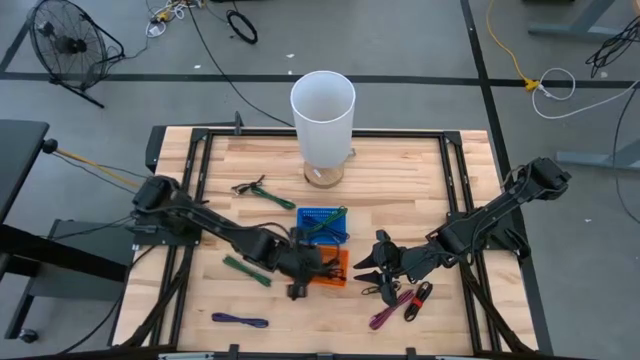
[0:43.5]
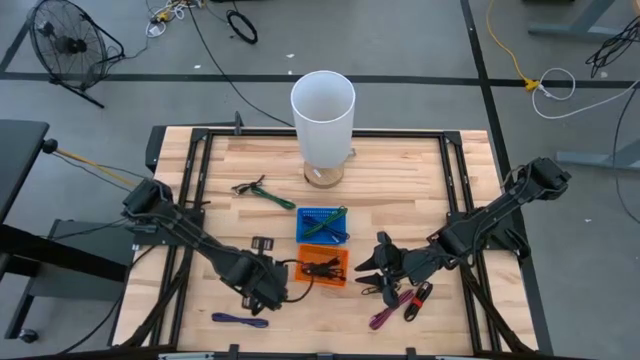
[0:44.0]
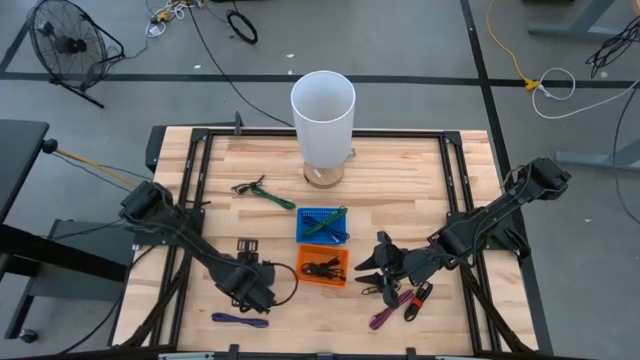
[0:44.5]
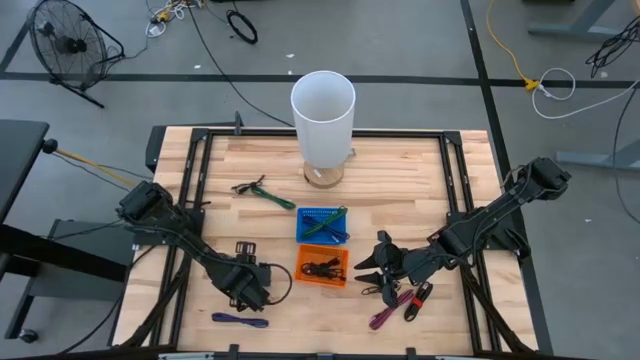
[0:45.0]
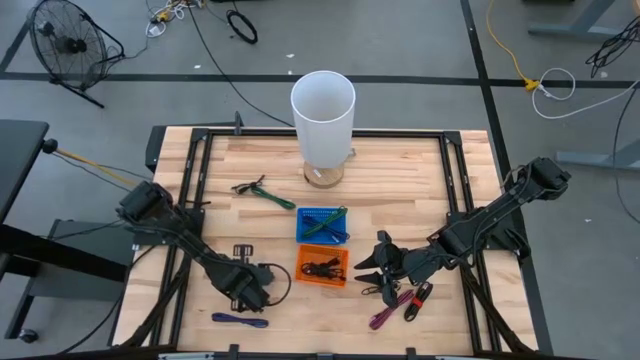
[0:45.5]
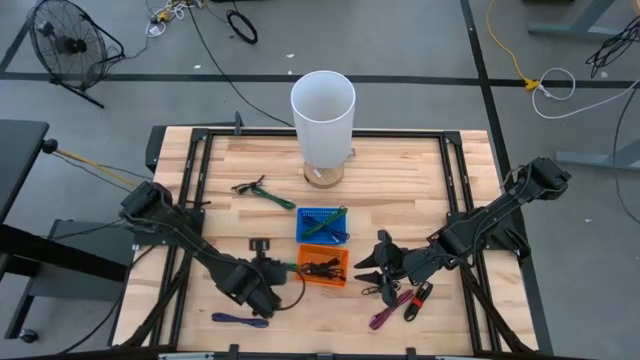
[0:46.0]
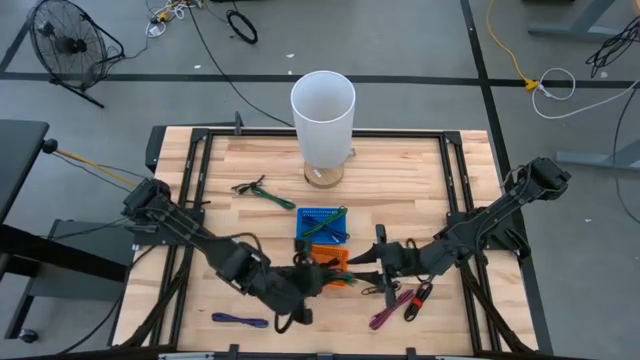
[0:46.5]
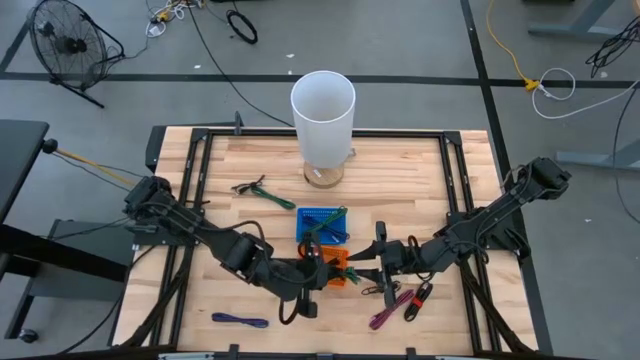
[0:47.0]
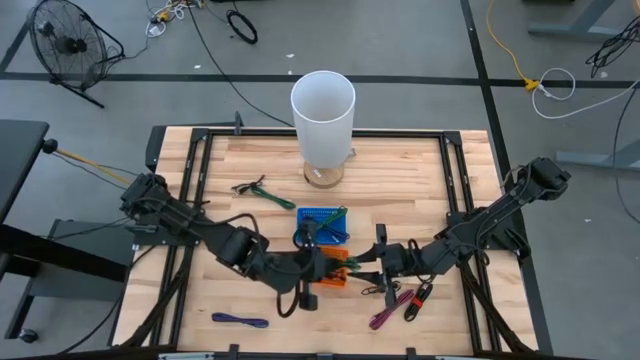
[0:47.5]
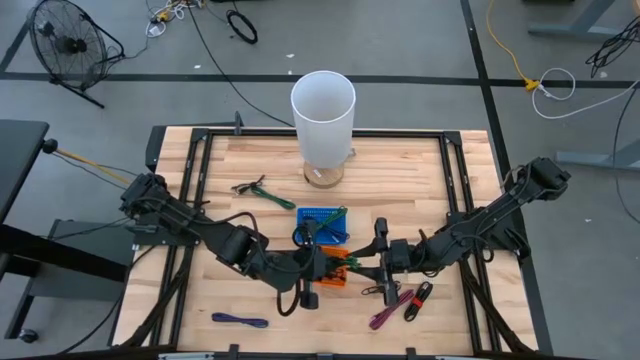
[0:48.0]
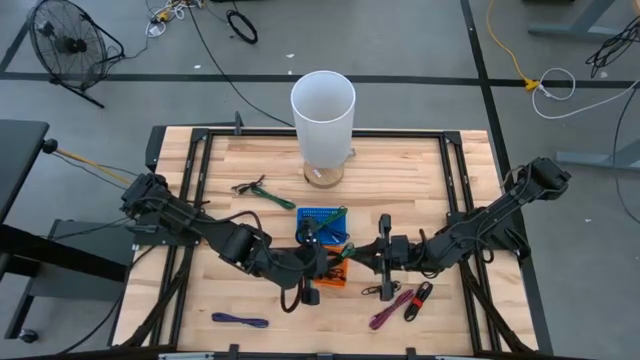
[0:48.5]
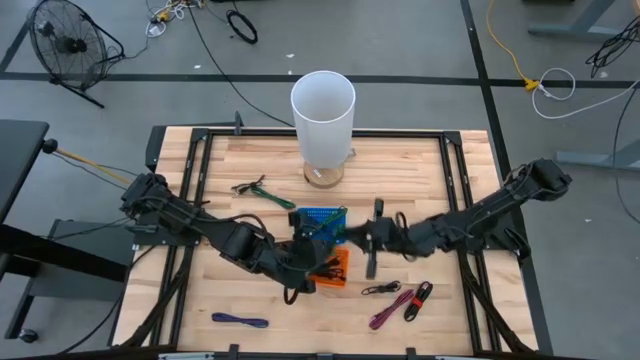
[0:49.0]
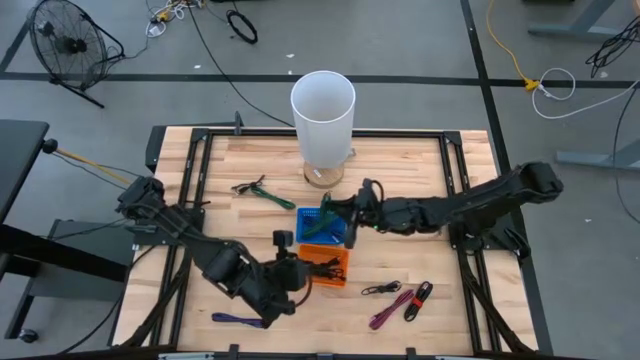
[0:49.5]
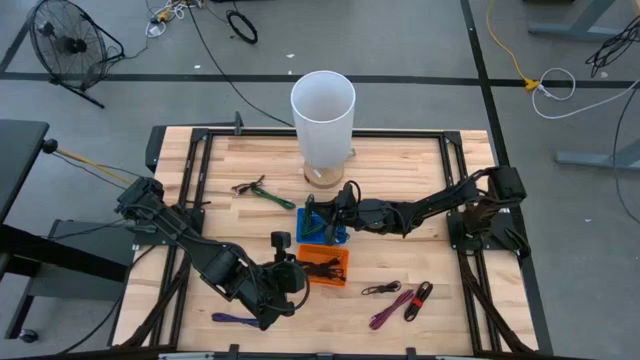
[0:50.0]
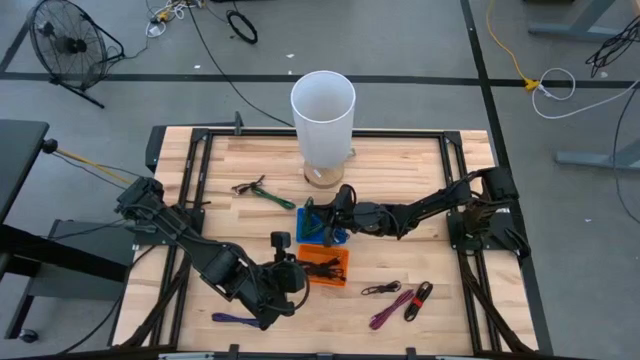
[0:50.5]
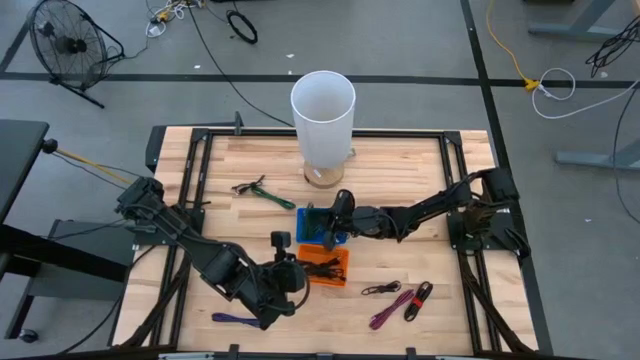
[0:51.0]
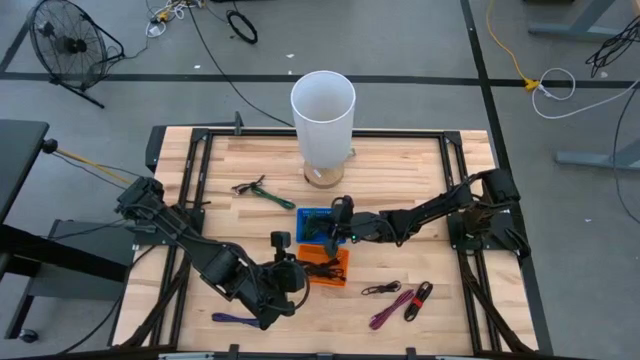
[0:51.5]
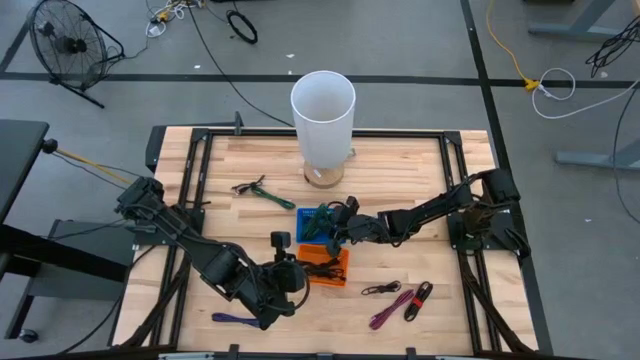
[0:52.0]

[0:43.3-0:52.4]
Task: Pick & Place USB Port
Put the green charger cable into the blue bin

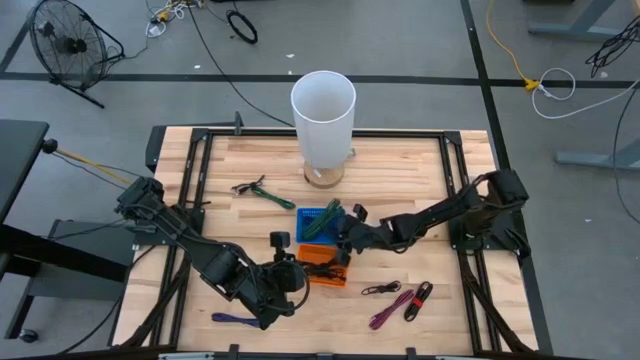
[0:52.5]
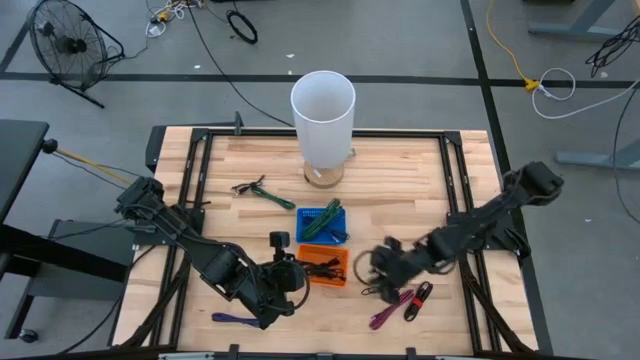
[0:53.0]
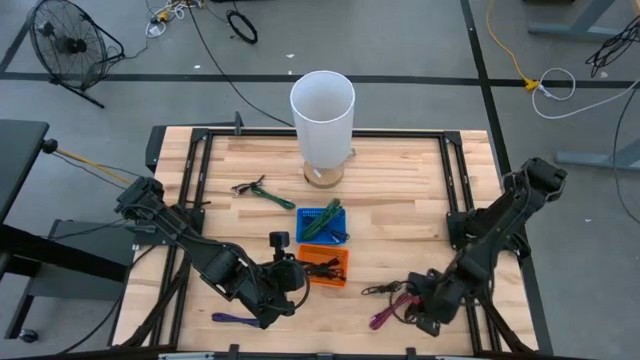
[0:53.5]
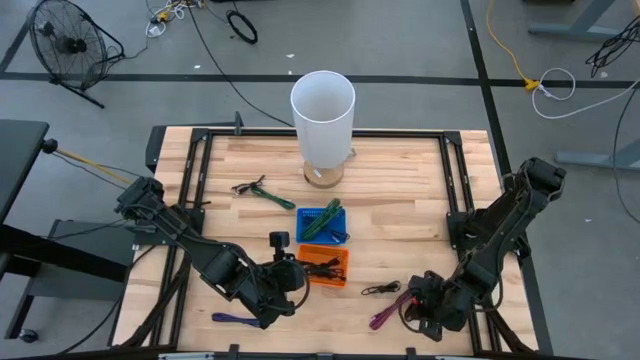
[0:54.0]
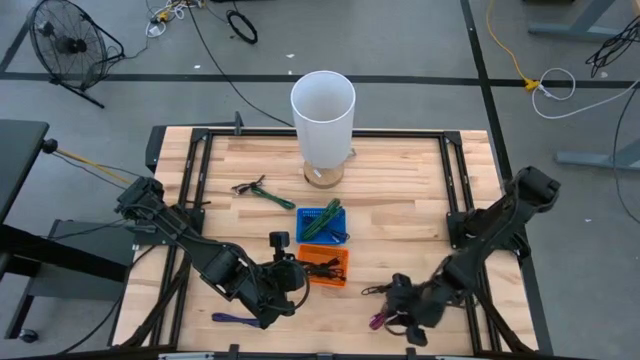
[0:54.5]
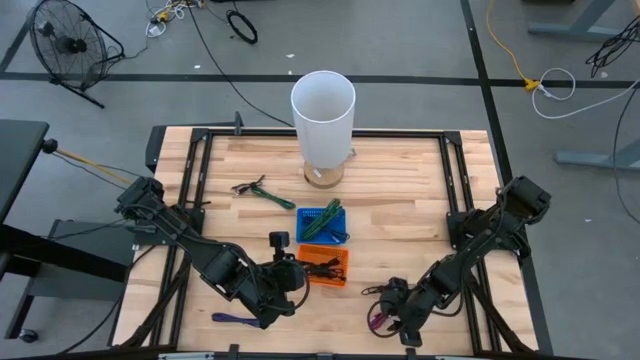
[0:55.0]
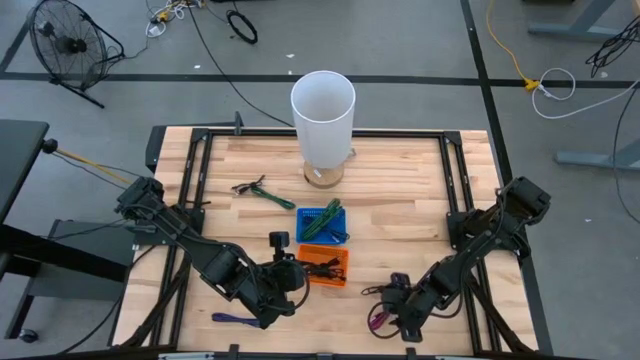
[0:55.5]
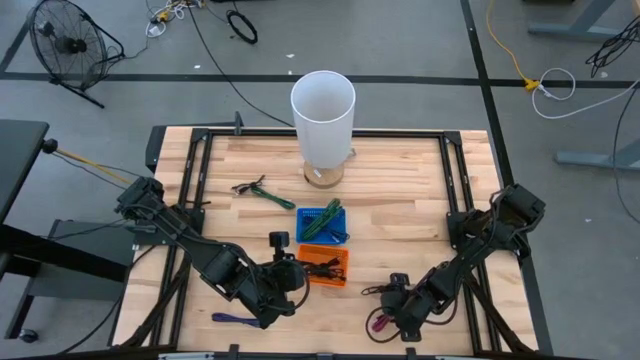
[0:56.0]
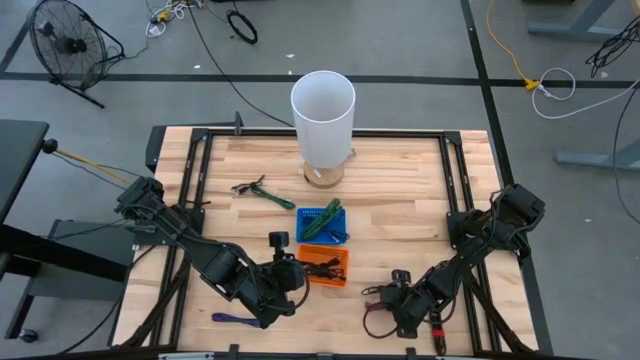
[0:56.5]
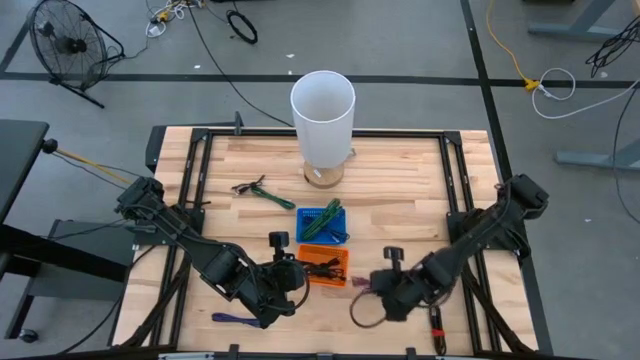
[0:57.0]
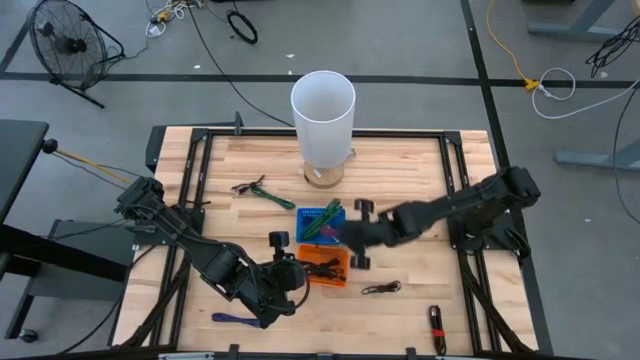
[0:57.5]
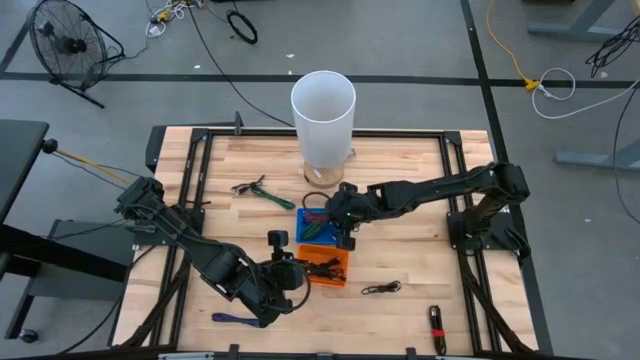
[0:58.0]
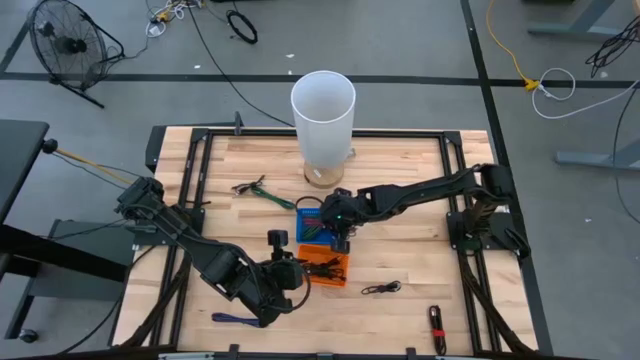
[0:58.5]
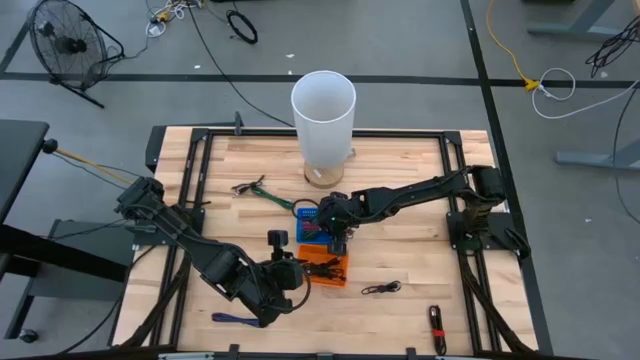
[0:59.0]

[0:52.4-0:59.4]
Put the pink charger cable into the blue bin

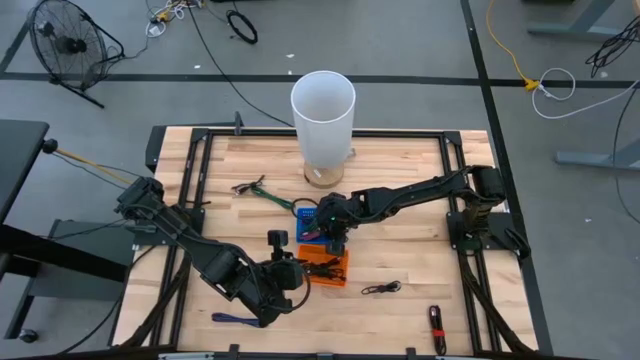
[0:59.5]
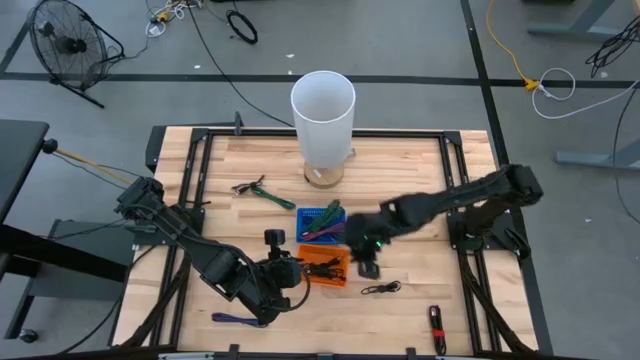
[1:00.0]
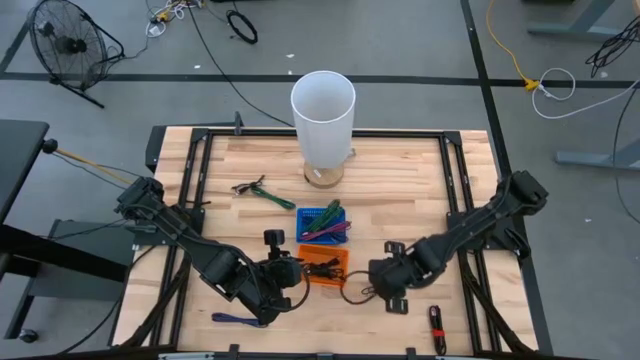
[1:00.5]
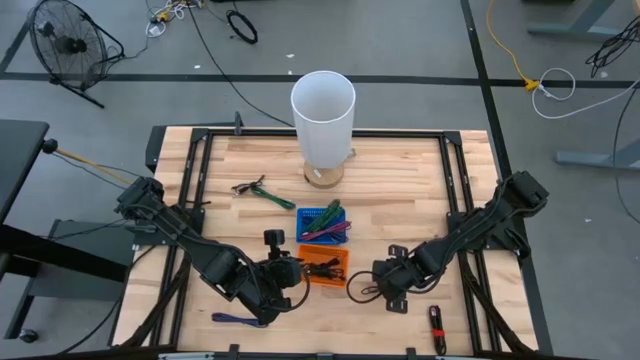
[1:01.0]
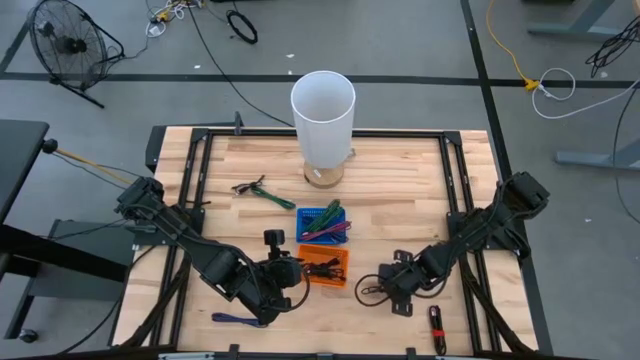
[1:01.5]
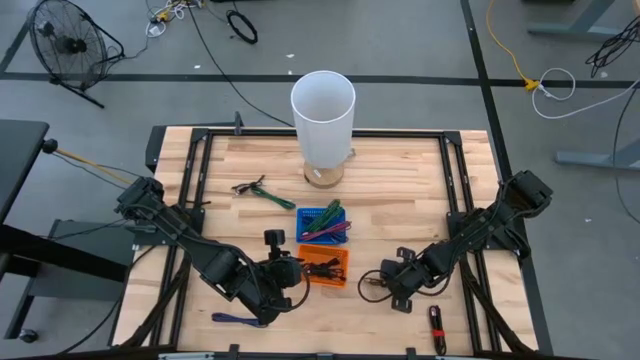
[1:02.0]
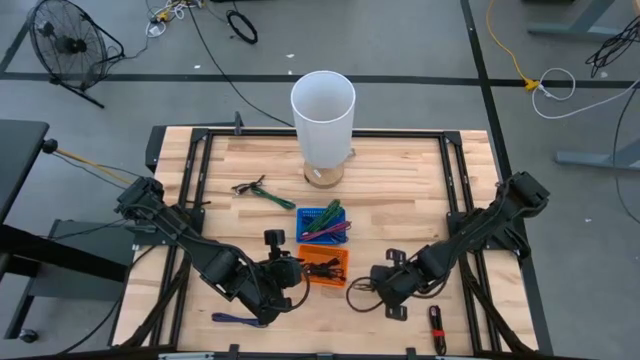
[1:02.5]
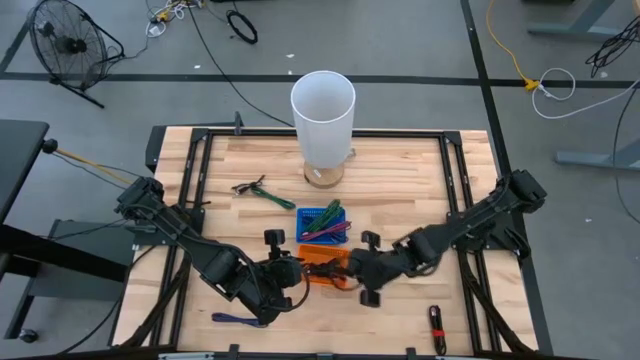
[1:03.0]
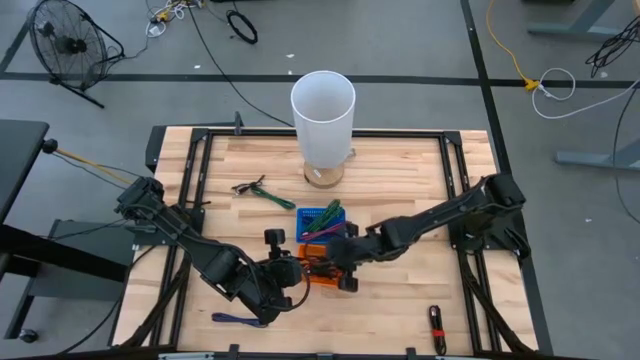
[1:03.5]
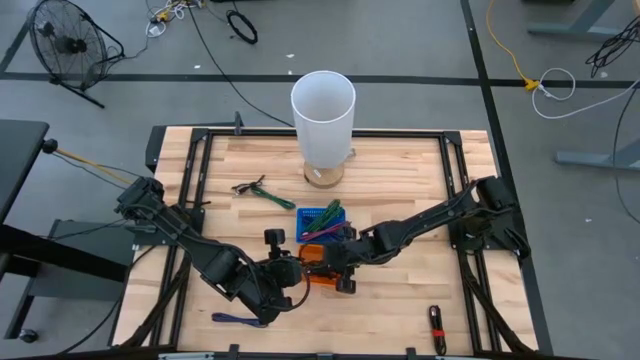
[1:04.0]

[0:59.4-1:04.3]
Put the black charger cable into the orange bin

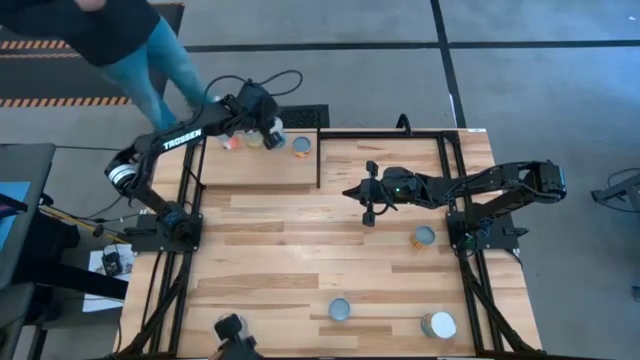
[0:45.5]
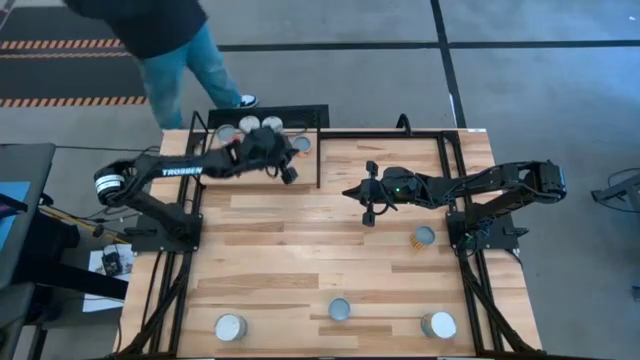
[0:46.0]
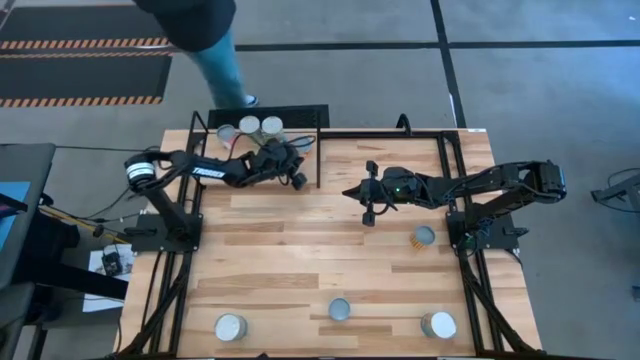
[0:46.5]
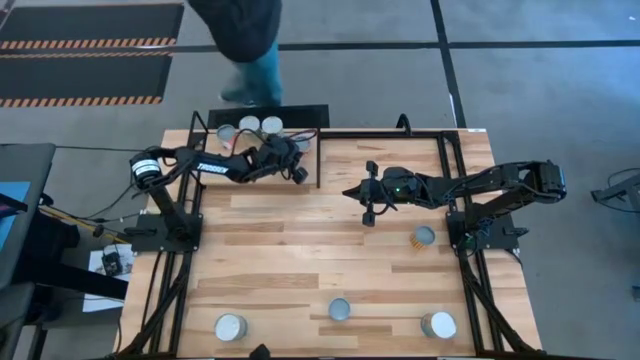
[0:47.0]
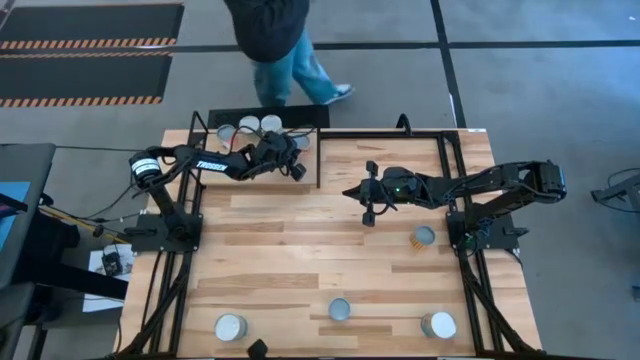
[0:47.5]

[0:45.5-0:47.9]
Task: Pick and place cans onto a shelf
Adjust the small canned pineapple on the shelf
